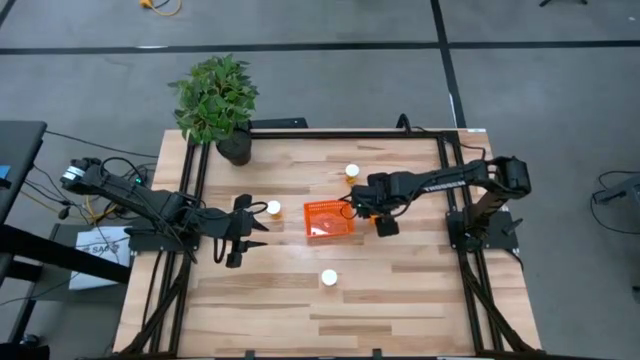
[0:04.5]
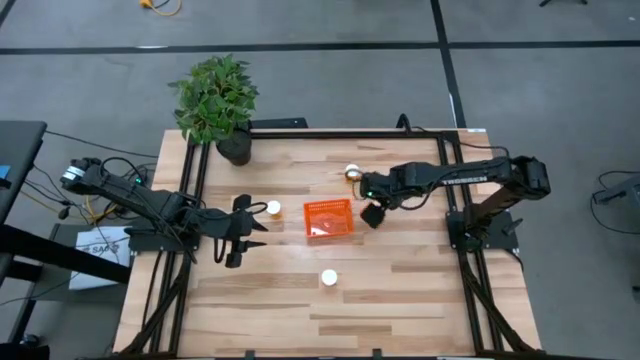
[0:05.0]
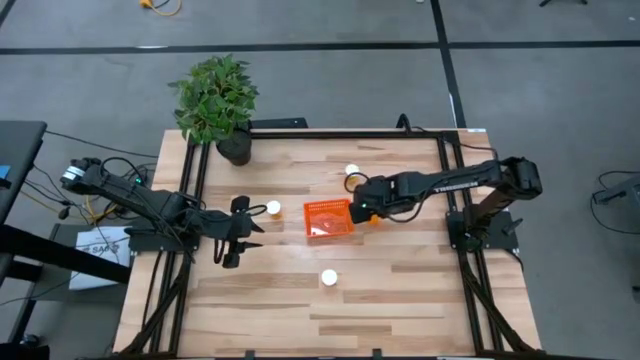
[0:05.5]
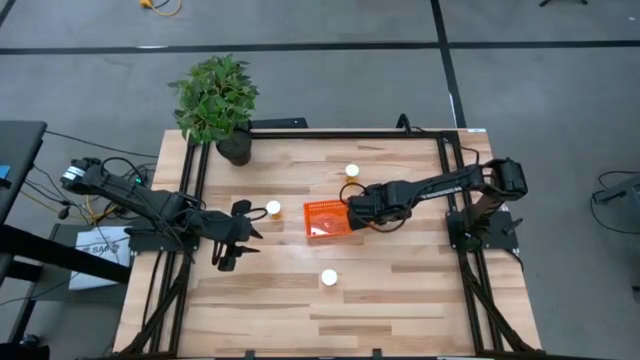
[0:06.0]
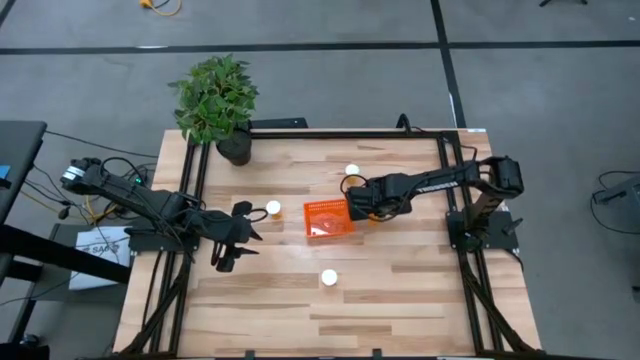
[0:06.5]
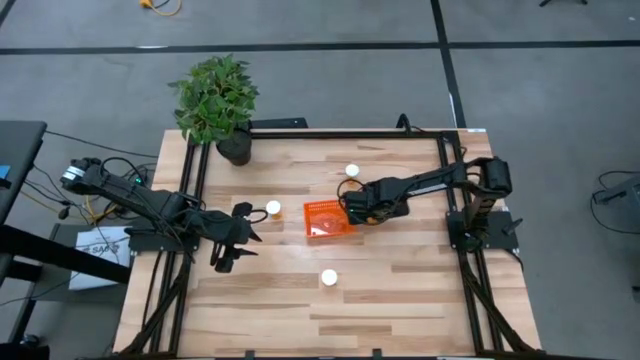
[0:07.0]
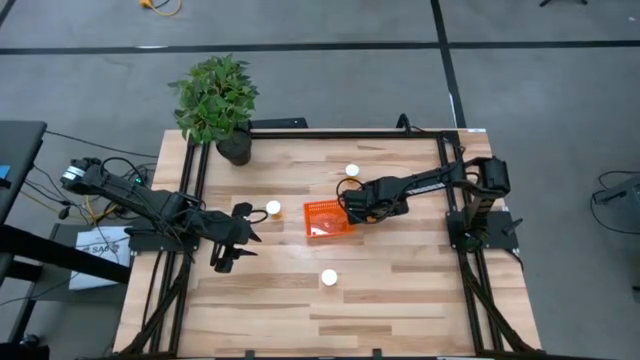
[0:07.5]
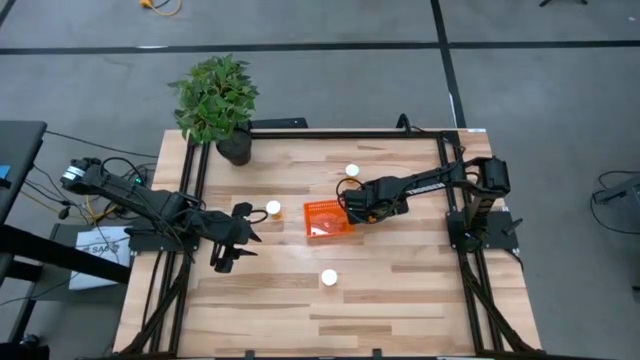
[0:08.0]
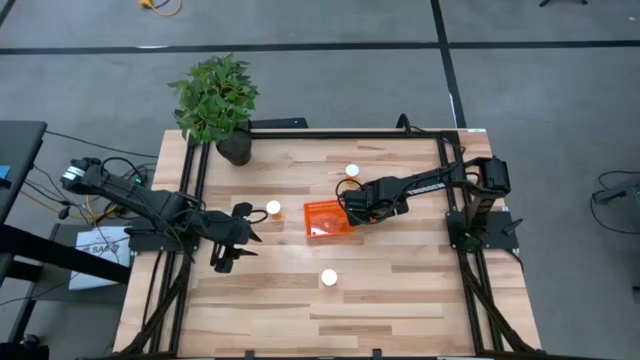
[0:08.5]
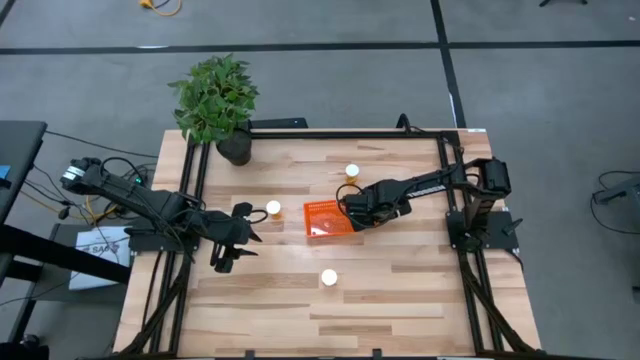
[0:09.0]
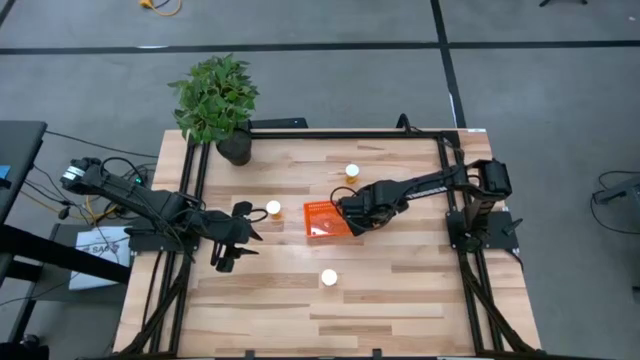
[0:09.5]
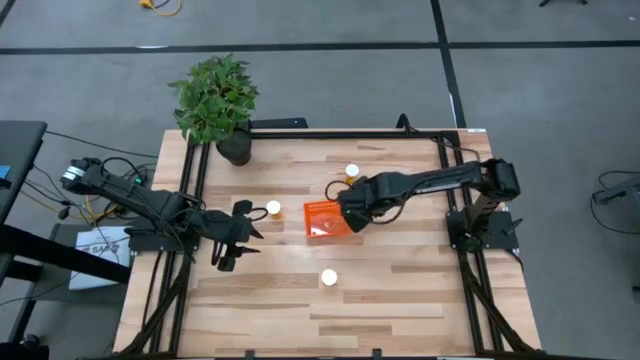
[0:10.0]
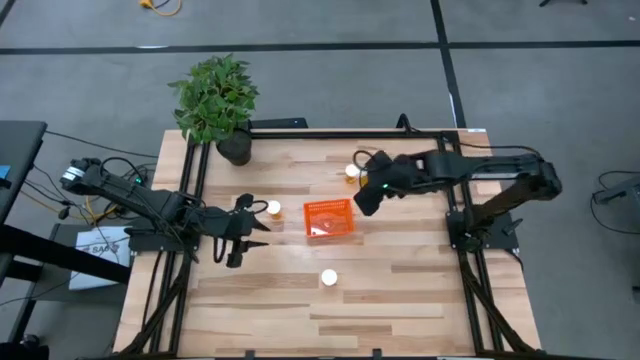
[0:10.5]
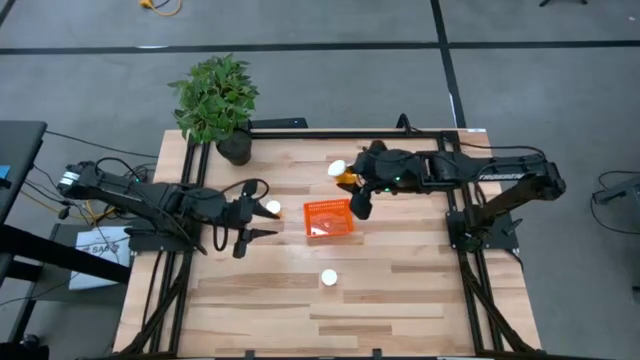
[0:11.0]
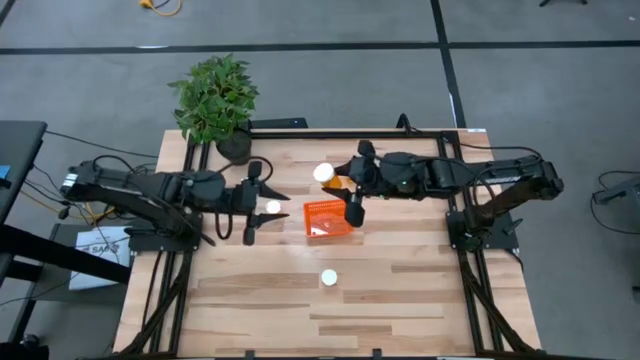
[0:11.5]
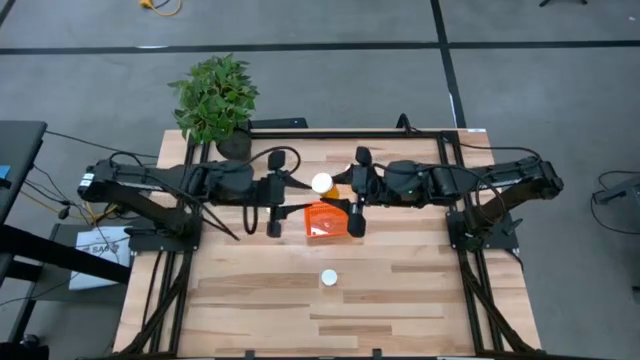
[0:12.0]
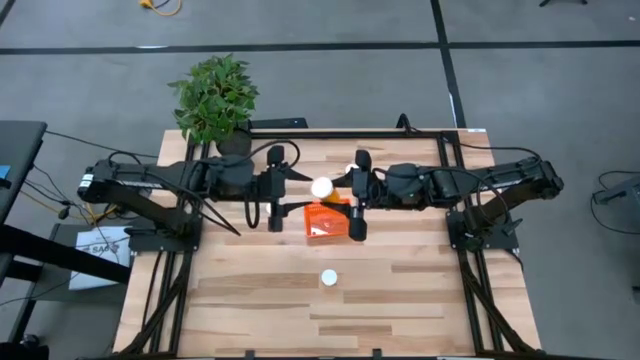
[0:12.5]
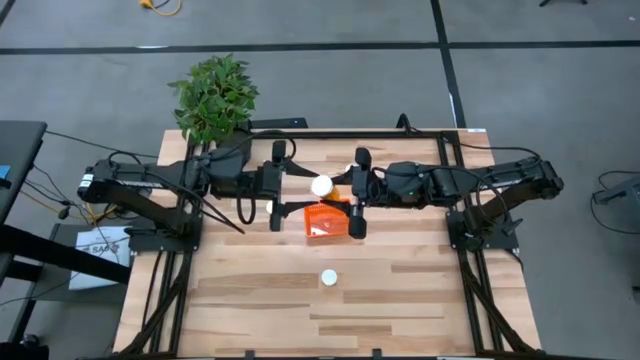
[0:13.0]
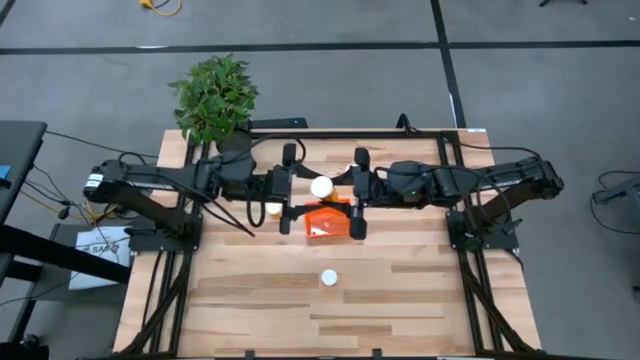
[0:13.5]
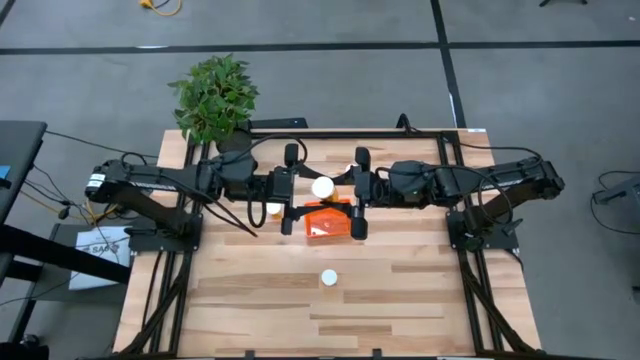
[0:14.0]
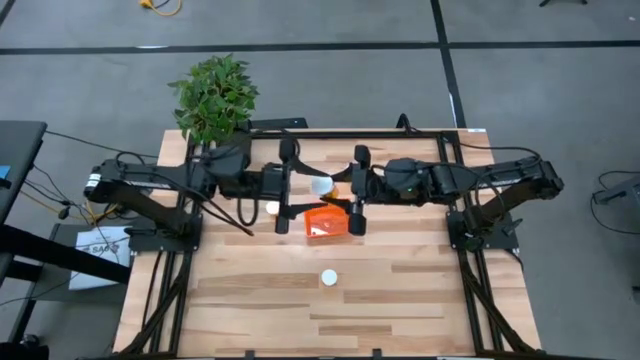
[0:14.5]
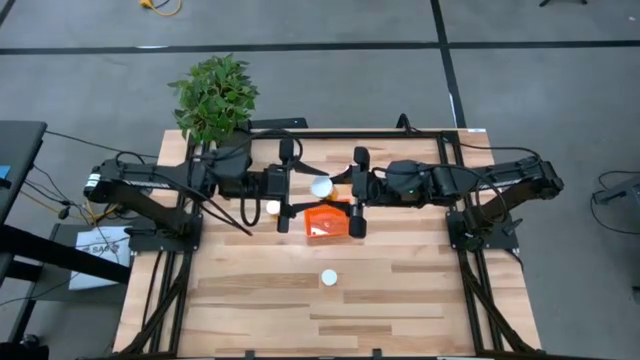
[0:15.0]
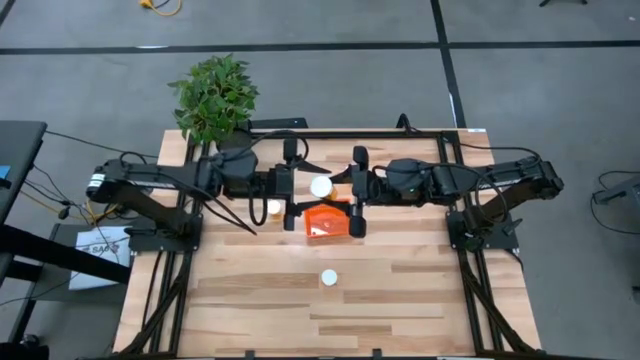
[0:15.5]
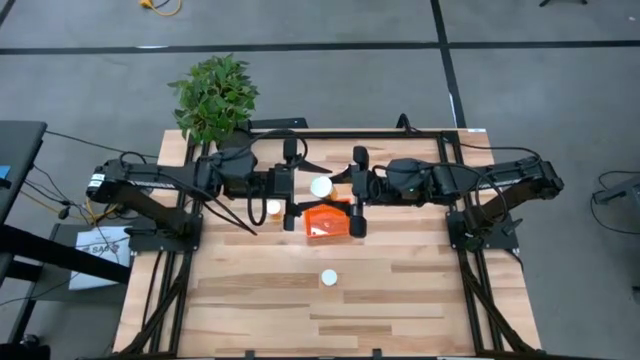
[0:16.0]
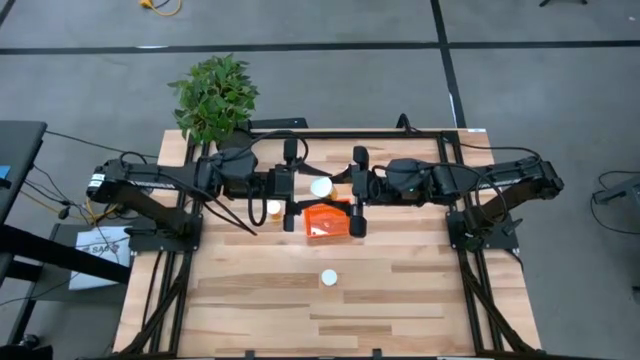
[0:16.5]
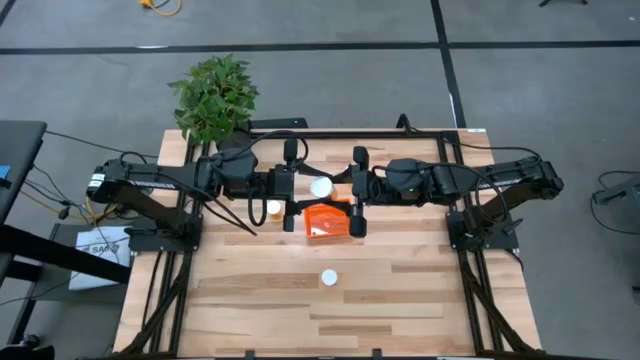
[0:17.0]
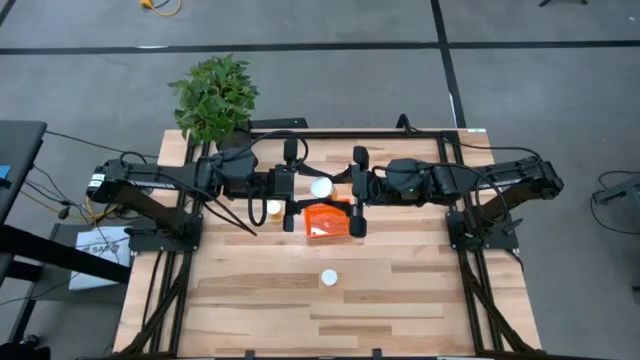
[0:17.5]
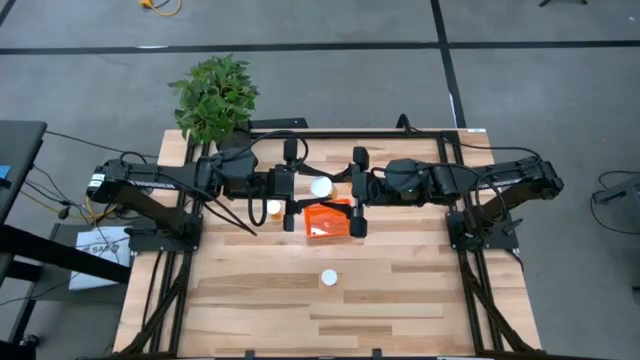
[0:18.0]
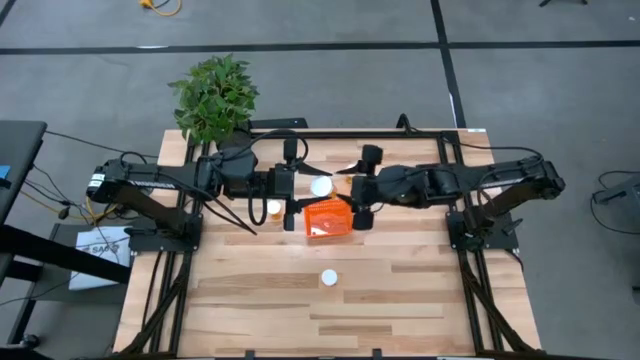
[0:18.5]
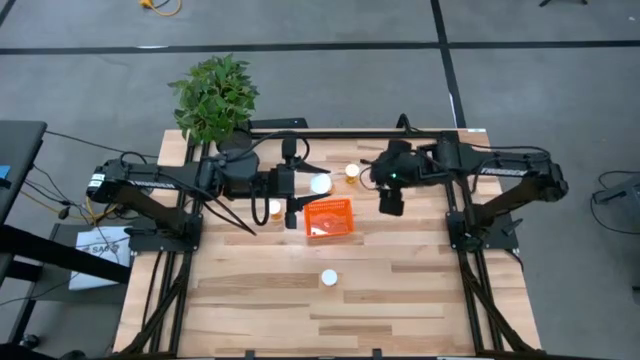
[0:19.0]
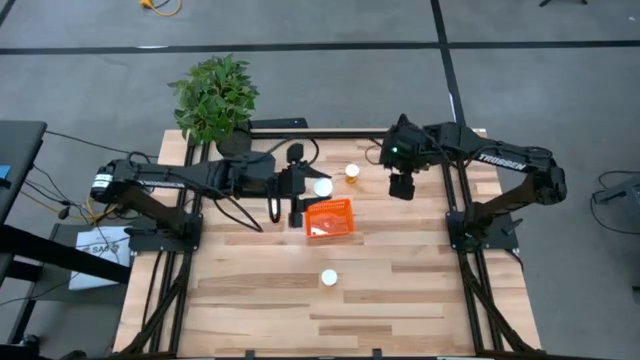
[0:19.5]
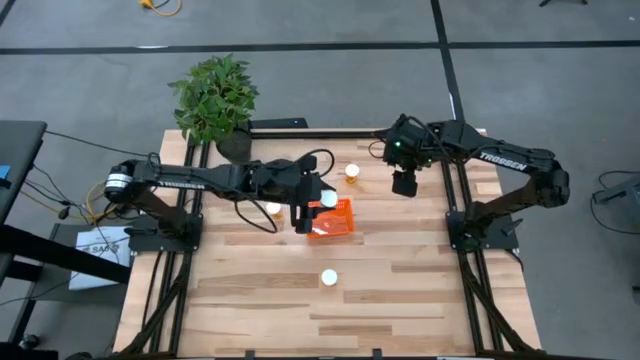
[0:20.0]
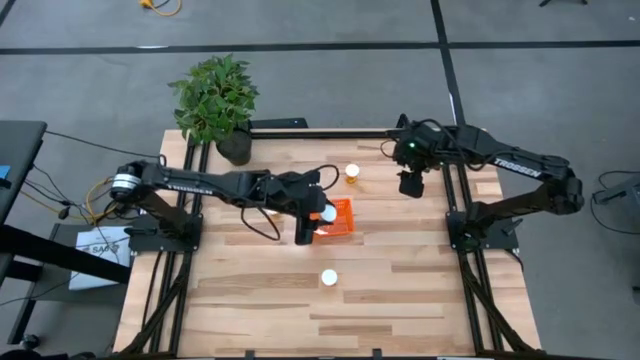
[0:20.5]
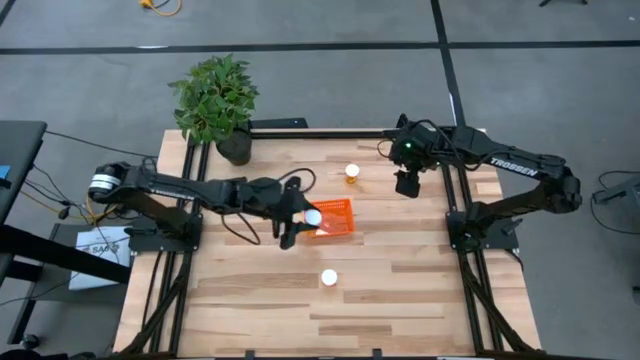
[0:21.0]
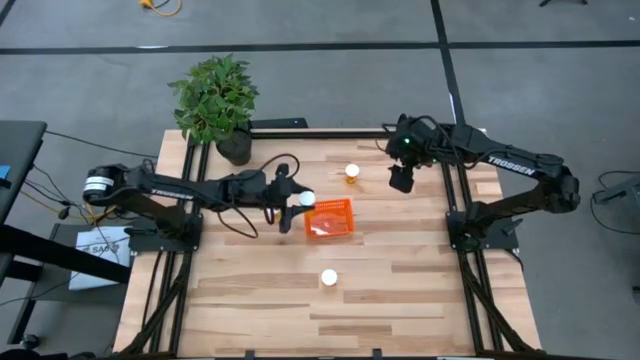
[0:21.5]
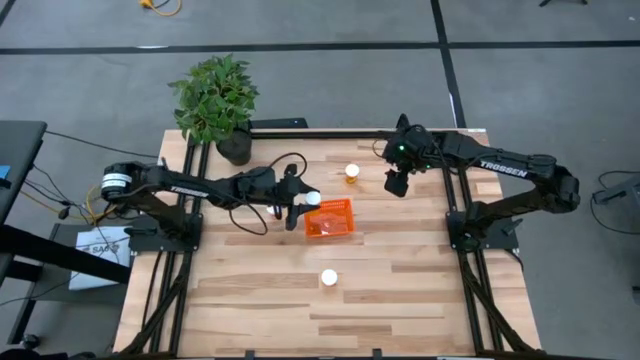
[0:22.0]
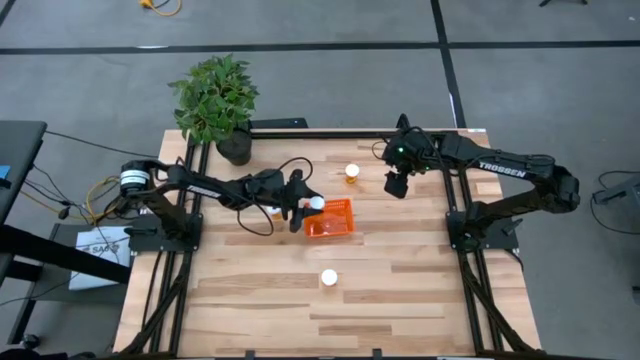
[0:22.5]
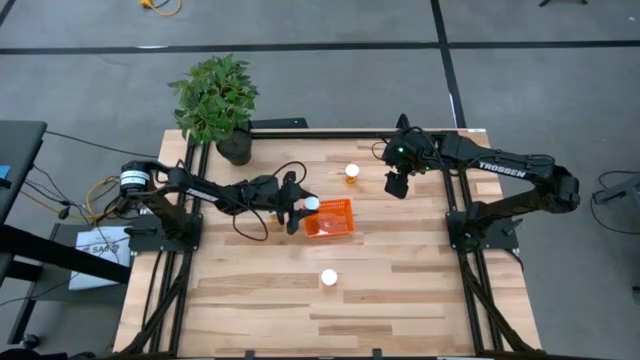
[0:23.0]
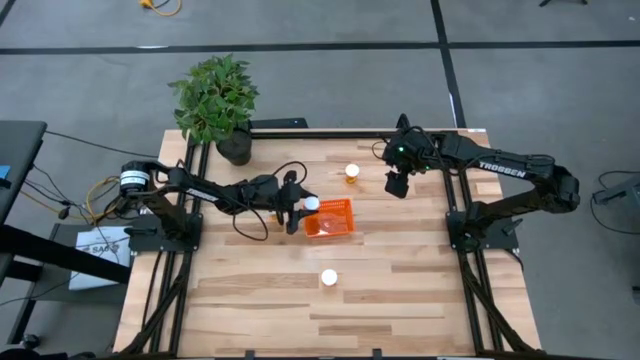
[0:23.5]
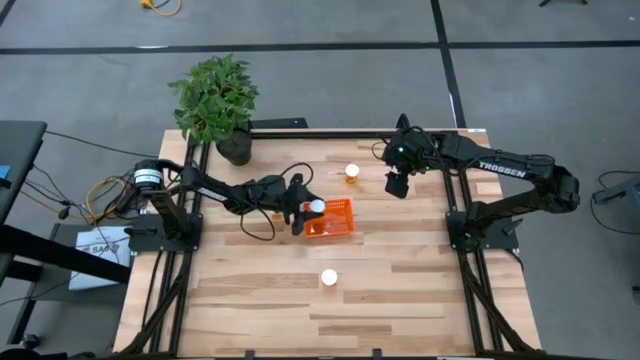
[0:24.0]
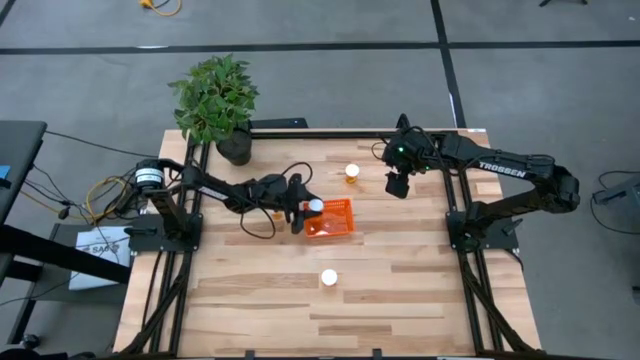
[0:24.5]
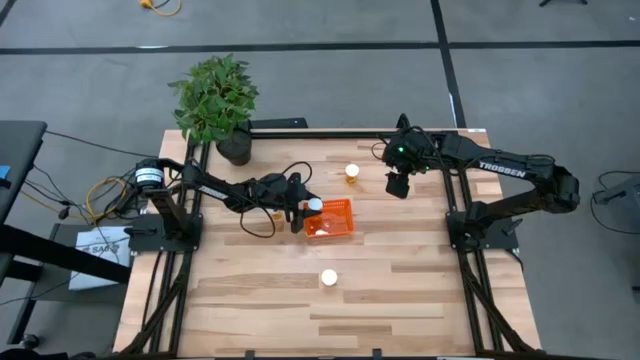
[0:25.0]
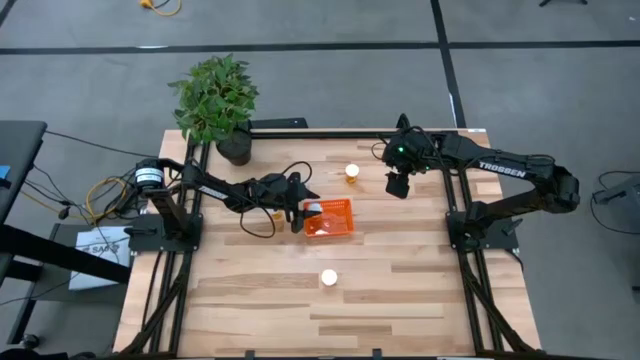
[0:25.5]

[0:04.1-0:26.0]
Task: Pick and place pill bottles into a basket
Put the orange pill bottle into the orange bin
